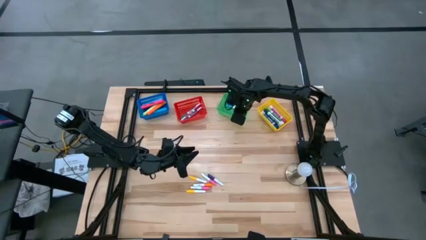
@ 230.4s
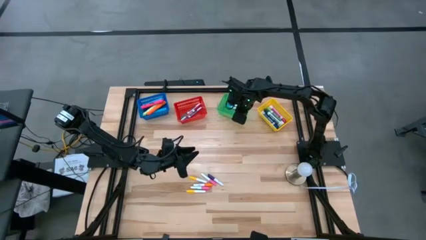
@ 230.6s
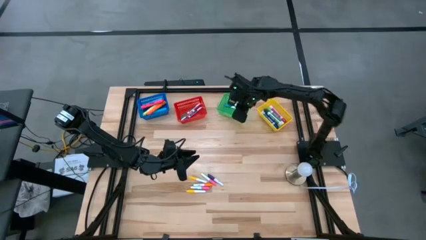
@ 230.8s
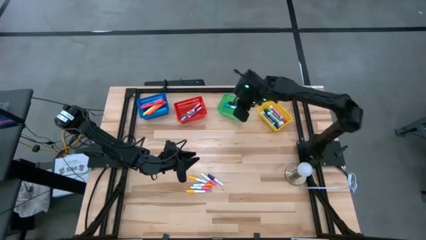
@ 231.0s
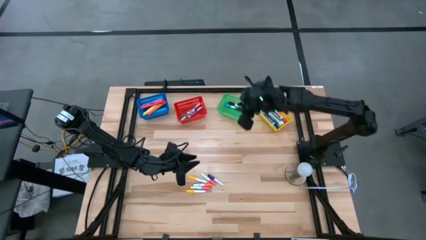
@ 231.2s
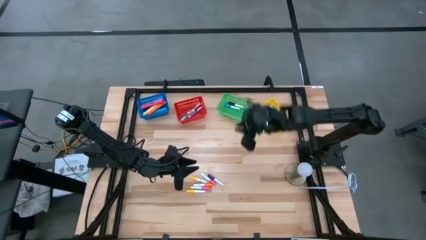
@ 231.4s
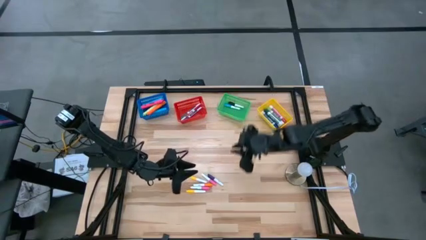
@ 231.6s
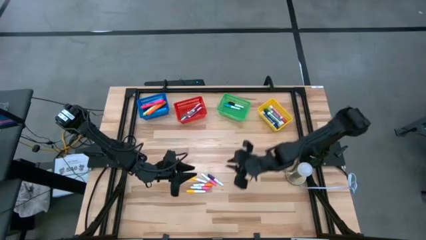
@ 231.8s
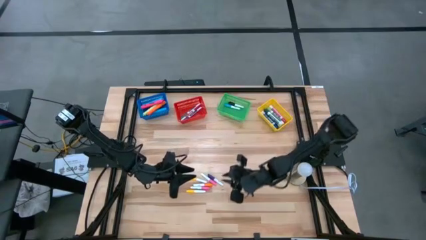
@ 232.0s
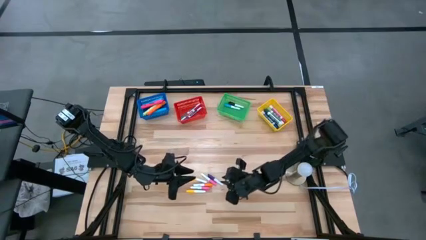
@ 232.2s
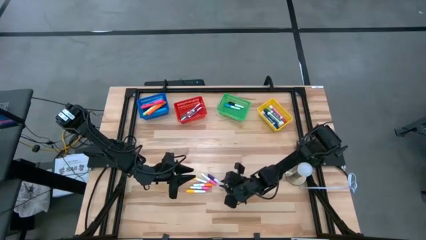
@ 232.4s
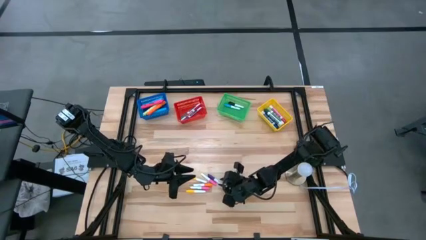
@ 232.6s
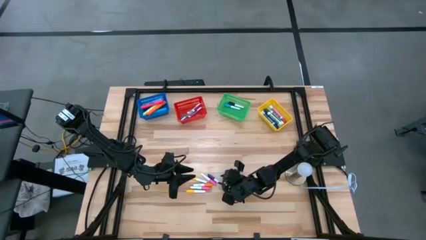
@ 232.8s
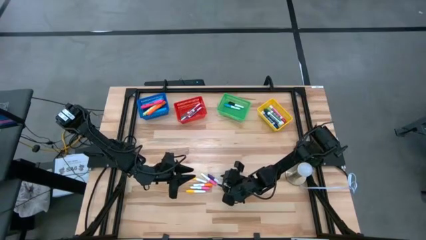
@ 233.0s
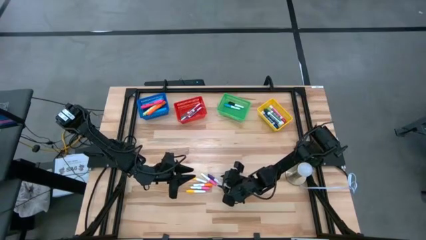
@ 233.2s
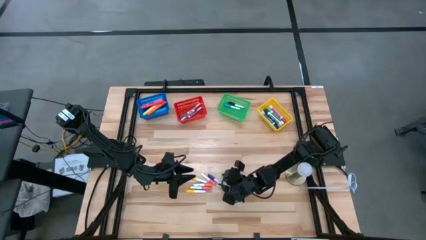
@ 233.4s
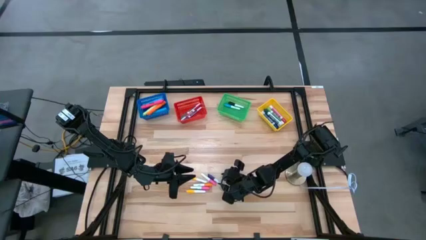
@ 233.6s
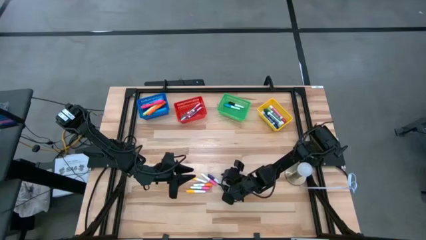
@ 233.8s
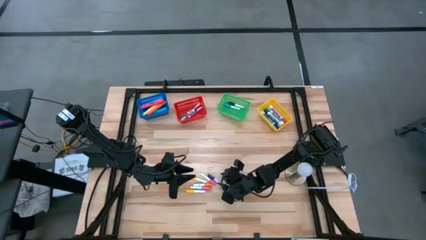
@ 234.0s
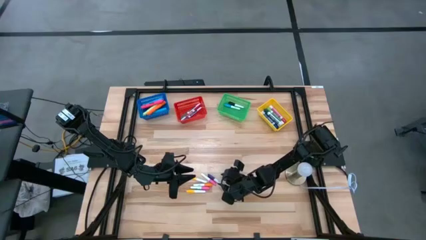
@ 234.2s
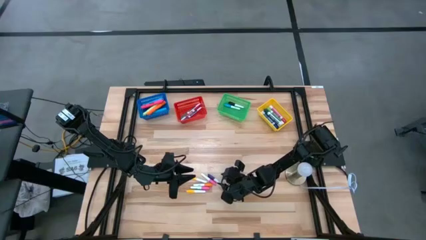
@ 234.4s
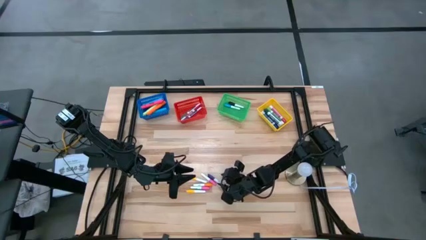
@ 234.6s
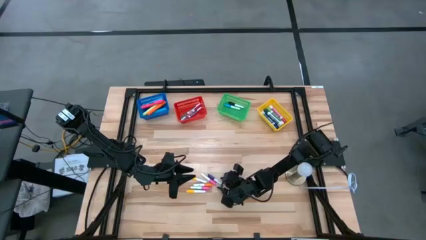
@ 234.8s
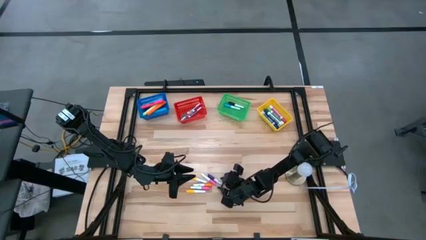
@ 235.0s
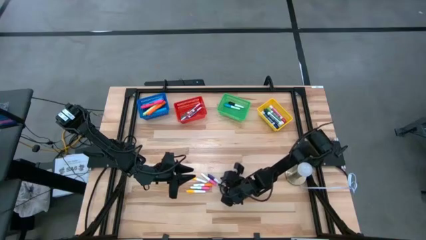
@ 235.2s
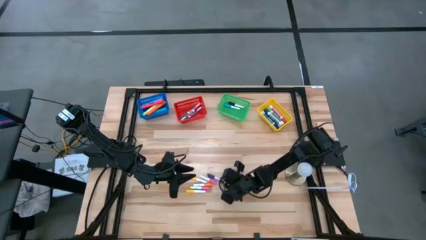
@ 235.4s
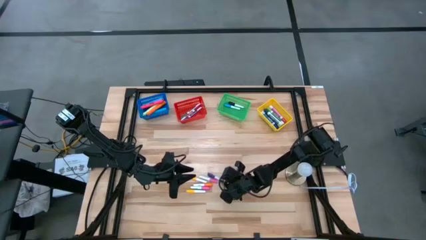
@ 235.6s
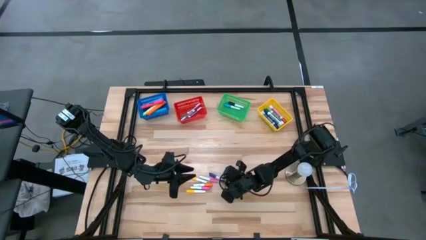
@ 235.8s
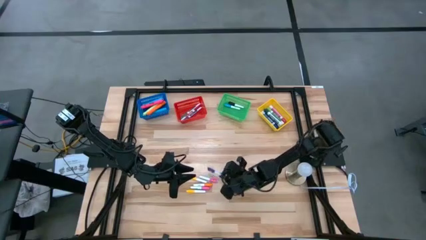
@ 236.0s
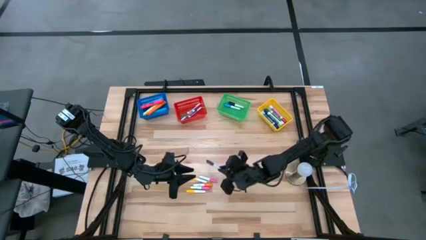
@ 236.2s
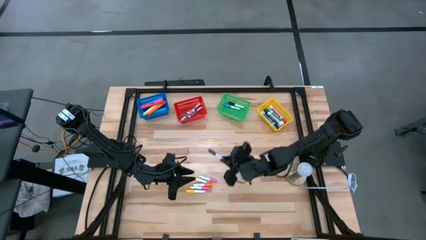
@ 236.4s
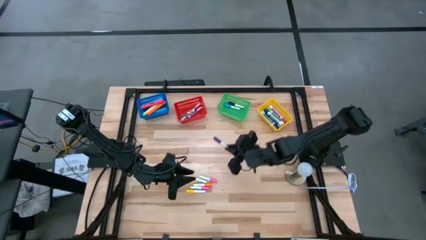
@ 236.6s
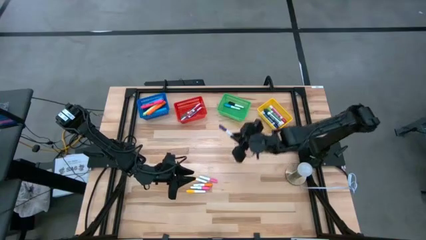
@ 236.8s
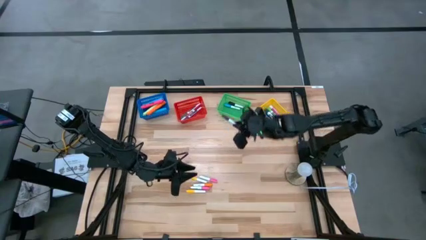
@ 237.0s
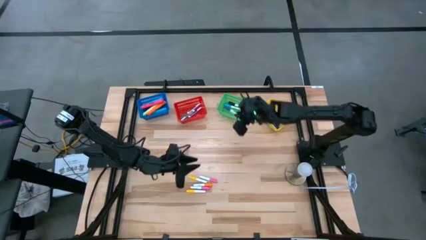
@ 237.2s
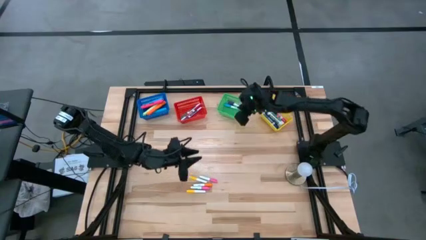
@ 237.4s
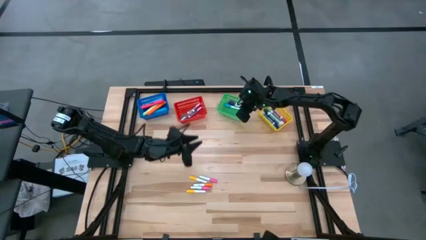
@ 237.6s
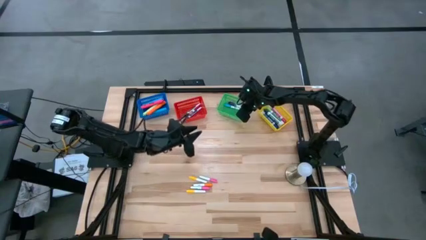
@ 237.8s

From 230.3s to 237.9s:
Task: Pick & Place Markers
Put the small purple highlighter pen into the green bin

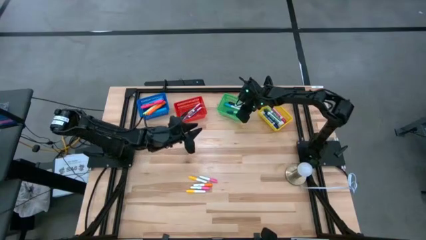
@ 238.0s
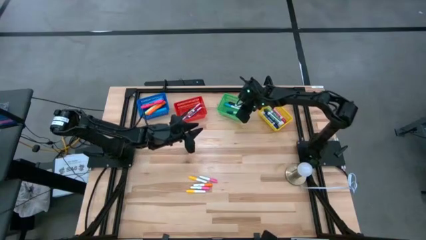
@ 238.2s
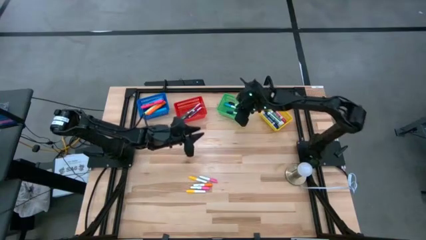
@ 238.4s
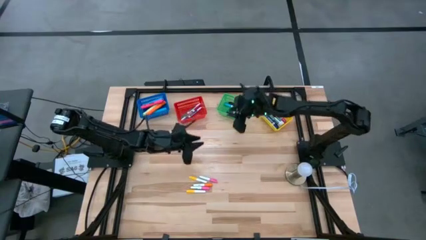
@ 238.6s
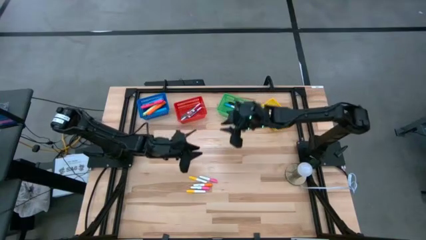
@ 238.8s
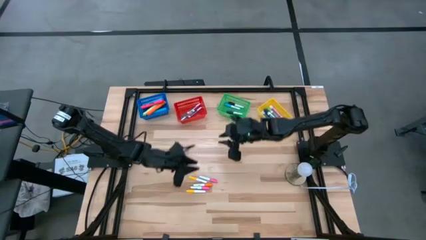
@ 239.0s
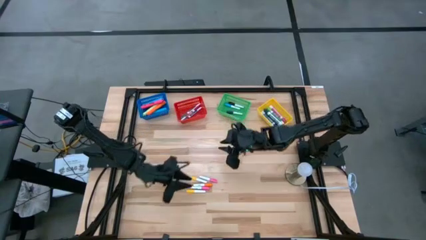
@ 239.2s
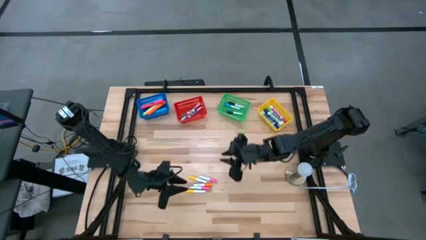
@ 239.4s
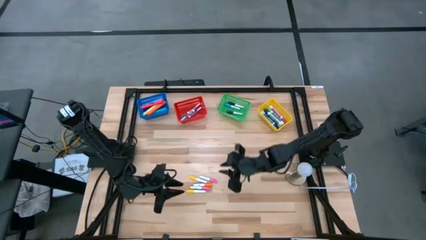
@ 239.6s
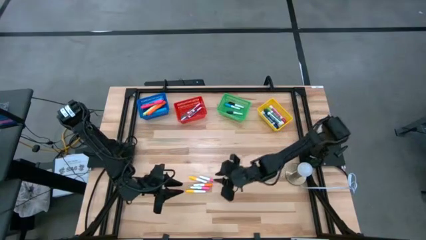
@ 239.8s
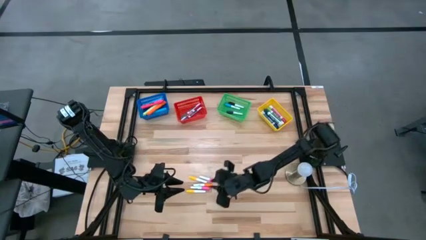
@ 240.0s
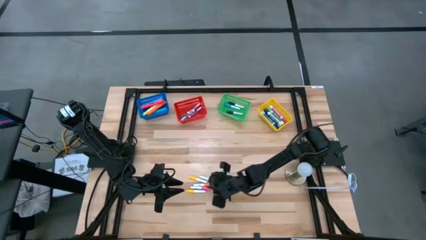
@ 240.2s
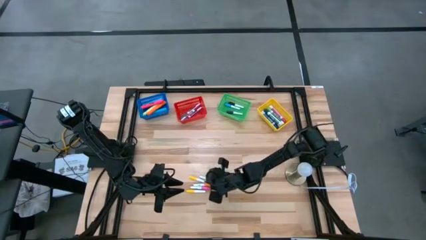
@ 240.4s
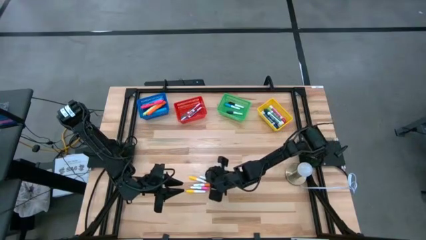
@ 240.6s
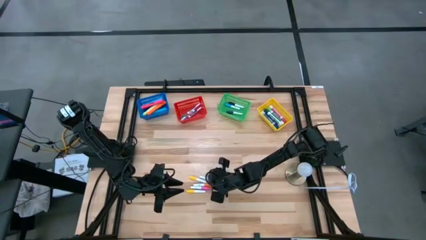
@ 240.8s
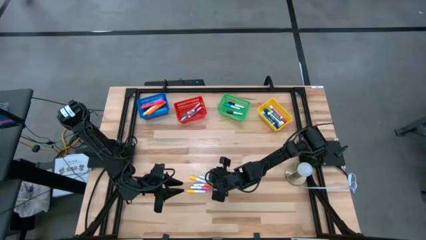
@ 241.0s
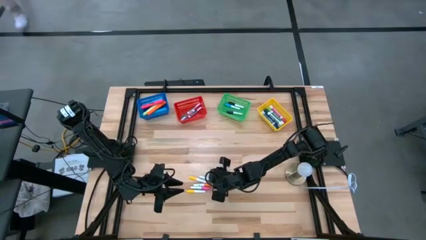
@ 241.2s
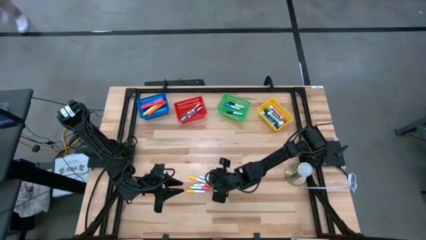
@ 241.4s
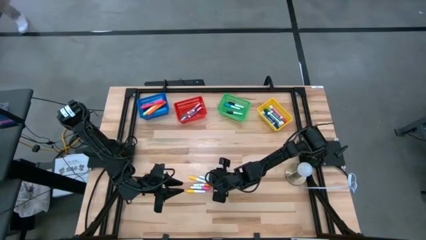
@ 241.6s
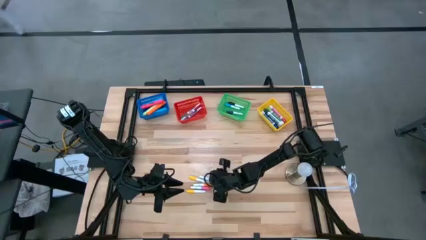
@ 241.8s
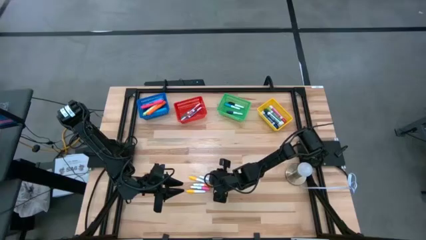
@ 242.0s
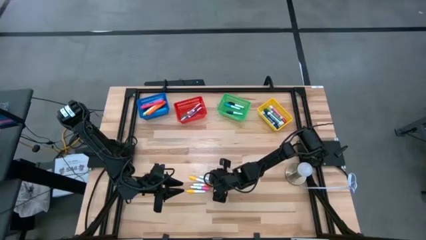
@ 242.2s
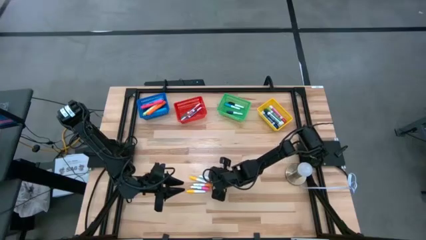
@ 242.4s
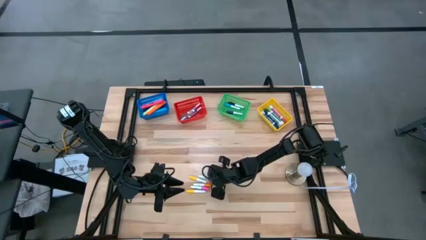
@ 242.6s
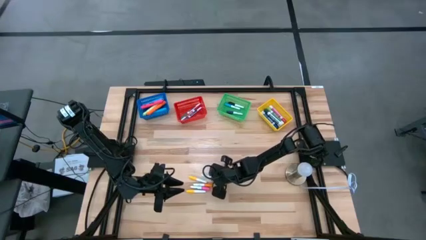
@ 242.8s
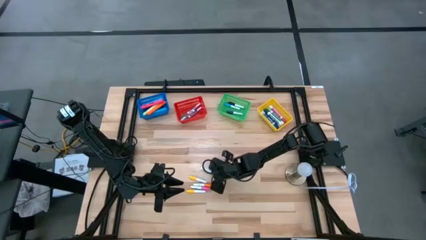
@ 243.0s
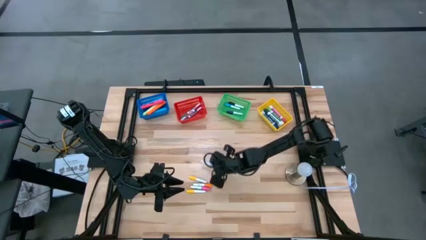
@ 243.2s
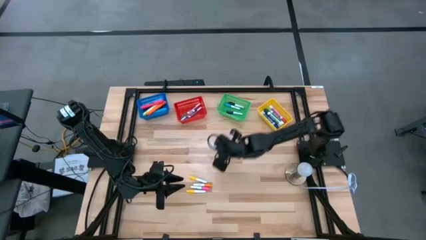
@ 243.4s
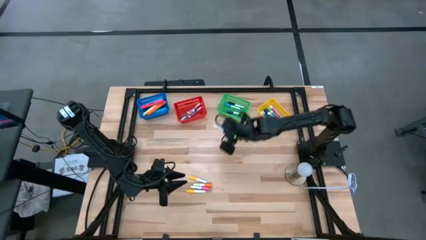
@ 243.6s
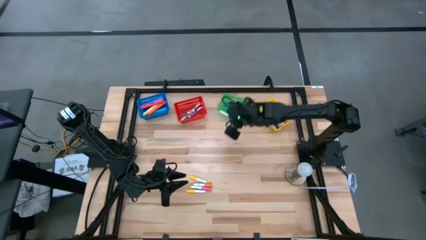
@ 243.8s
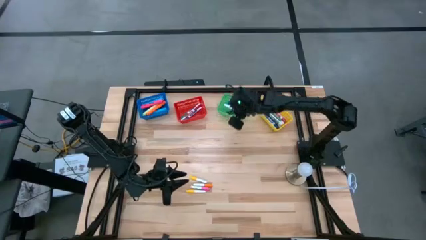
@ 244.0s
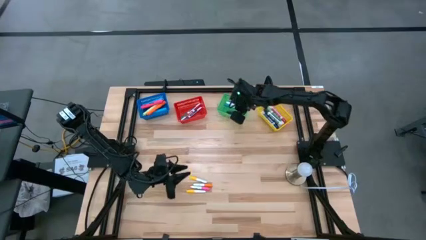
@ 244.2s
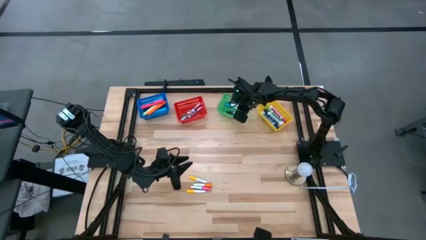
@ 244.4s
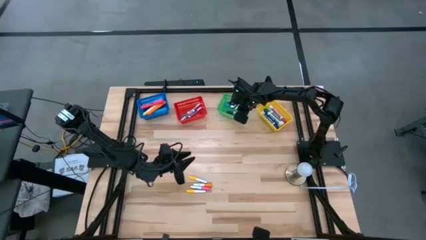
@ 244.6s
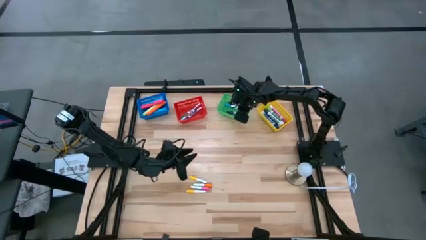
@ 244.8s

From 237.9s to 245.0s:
Put the top small pink highlighter pen into the green bin

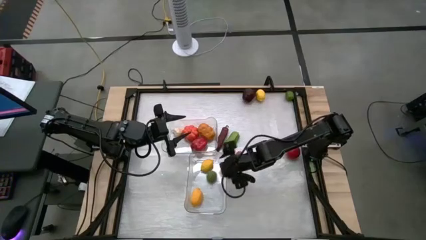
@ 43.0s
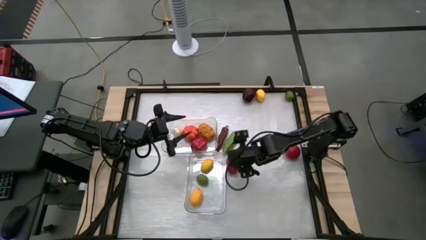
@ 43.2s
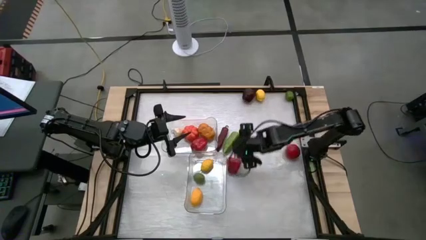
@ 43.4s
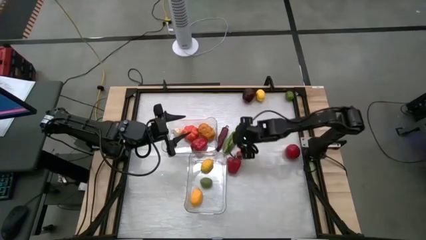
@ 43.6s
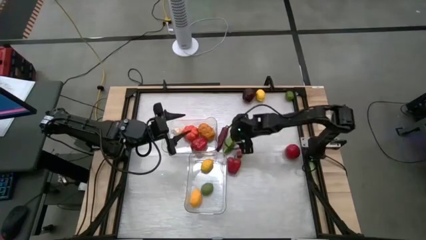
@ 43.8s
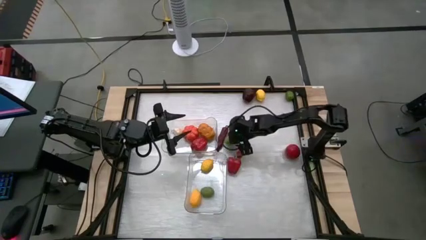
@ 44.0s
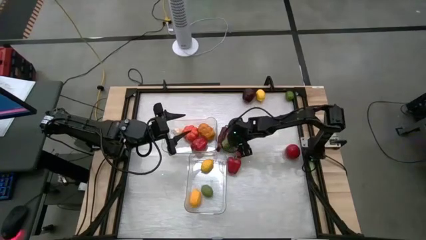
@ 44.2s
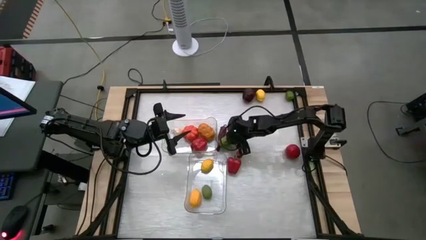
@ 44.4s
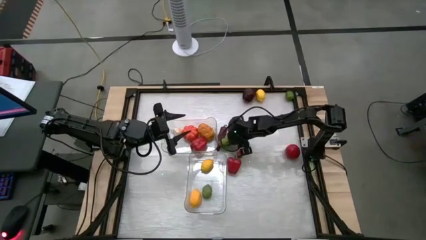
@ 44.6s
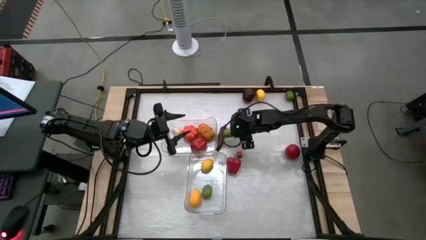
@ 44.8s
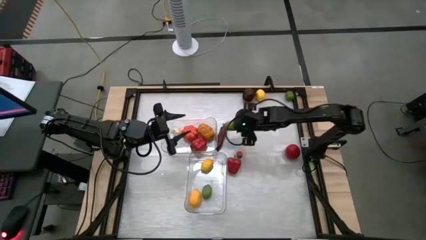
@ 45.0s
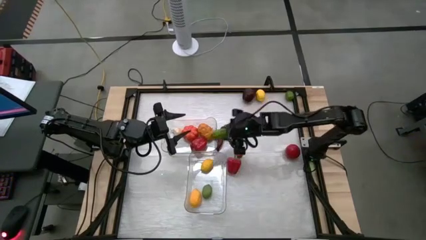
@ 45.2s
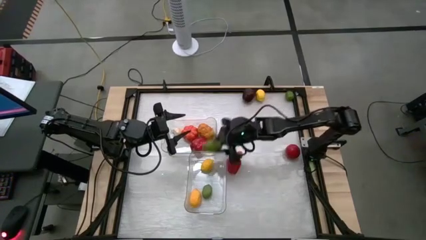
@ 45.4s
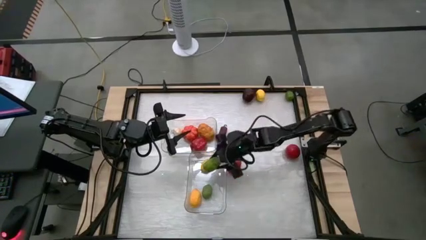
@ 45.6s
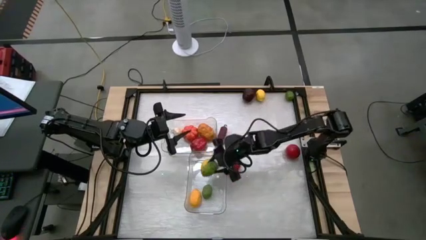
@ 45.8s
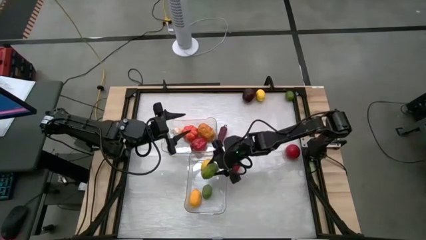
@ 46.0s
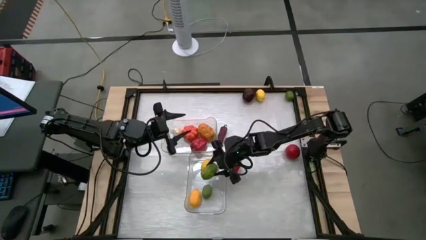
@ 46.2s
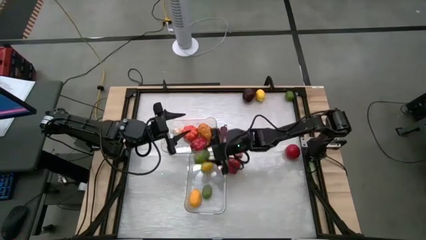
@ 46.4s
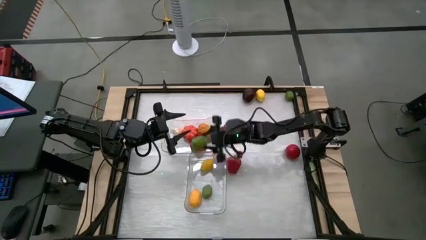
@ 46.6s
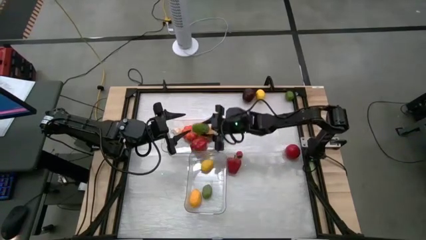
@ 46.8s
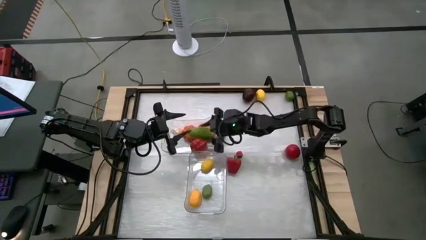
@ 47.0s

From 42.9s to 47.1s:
Task: Sort produce into baskets
Put the cucumber into the top transparent bin
